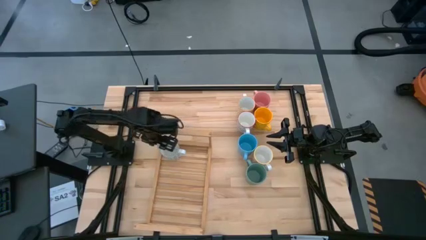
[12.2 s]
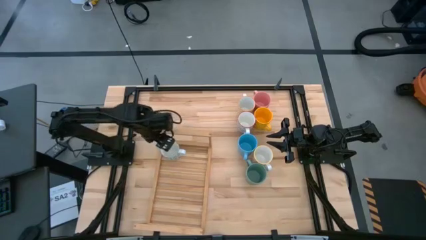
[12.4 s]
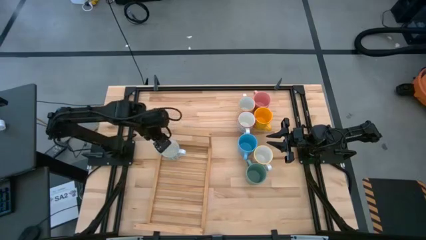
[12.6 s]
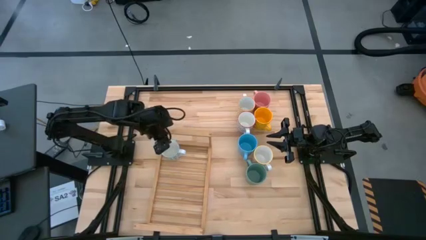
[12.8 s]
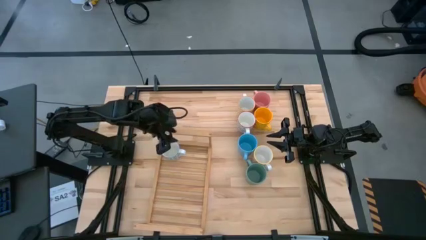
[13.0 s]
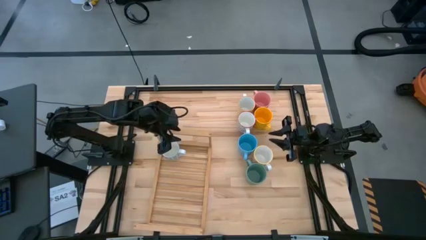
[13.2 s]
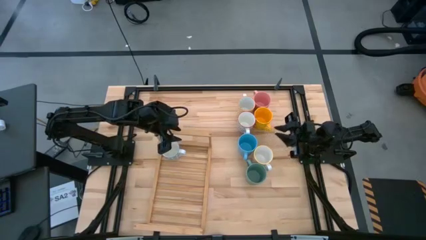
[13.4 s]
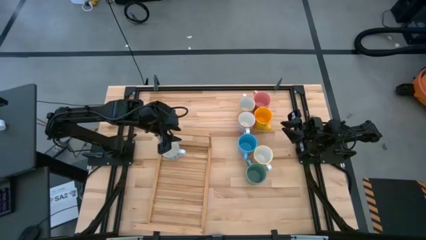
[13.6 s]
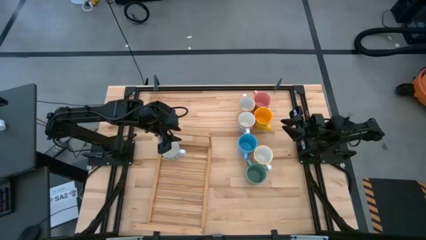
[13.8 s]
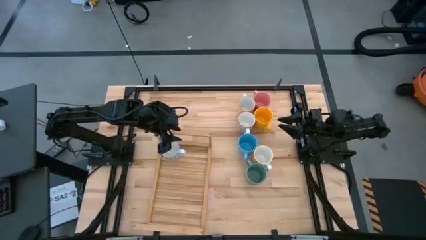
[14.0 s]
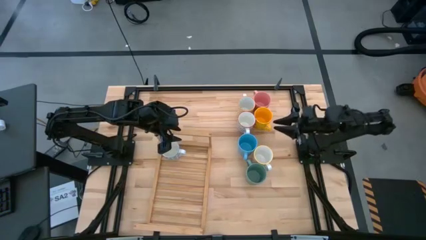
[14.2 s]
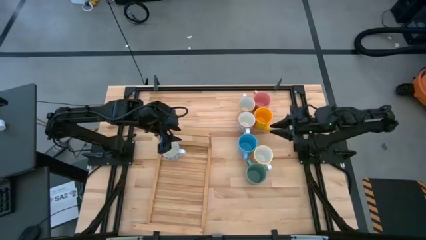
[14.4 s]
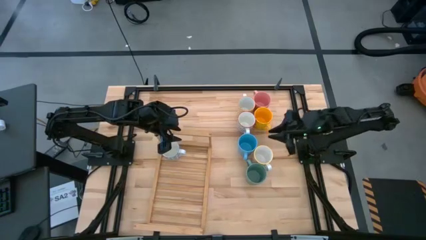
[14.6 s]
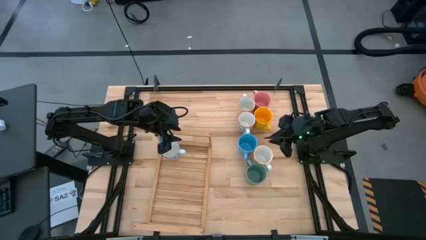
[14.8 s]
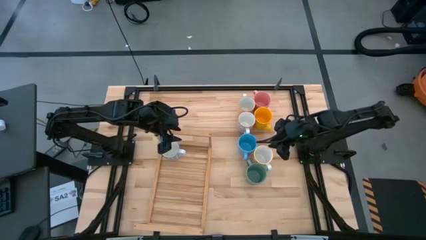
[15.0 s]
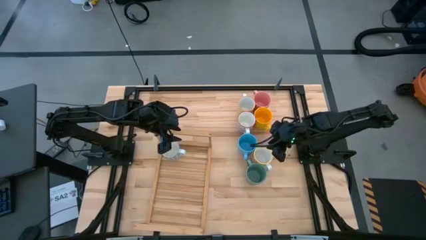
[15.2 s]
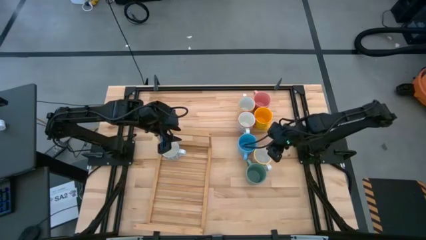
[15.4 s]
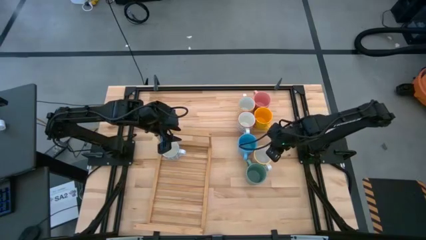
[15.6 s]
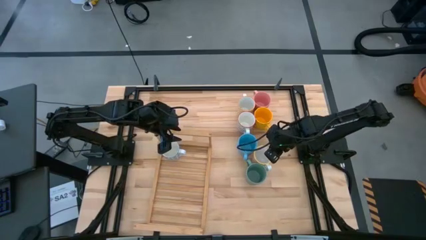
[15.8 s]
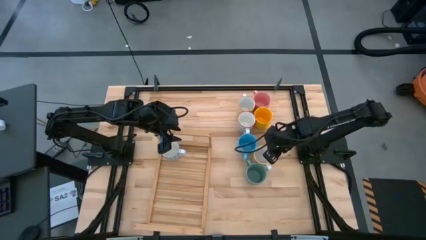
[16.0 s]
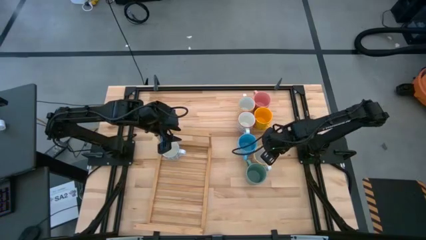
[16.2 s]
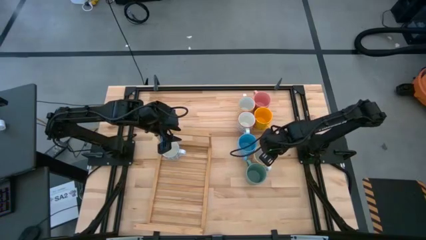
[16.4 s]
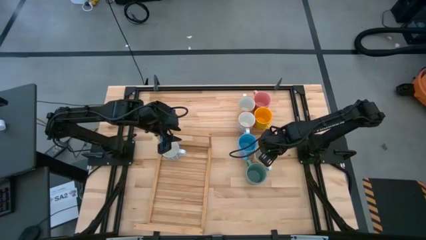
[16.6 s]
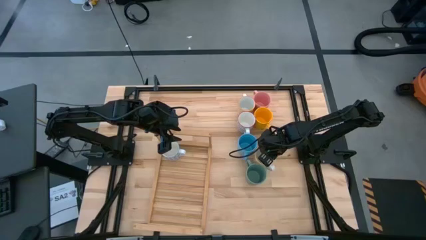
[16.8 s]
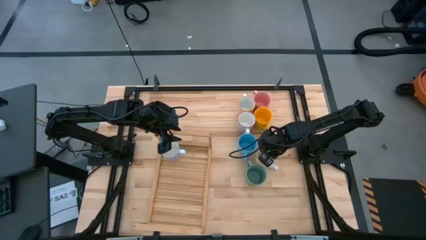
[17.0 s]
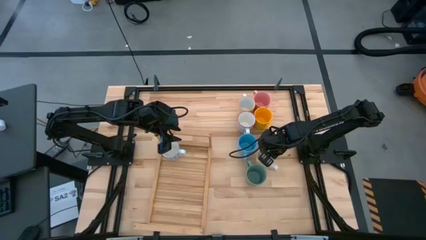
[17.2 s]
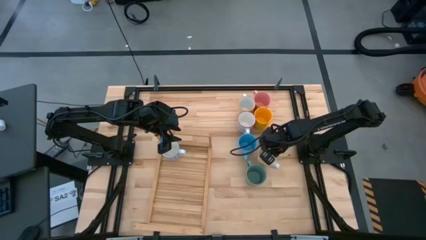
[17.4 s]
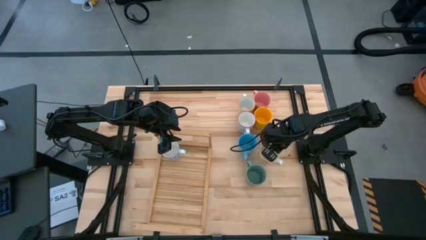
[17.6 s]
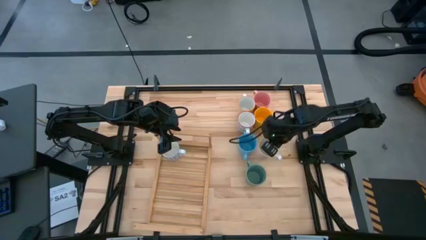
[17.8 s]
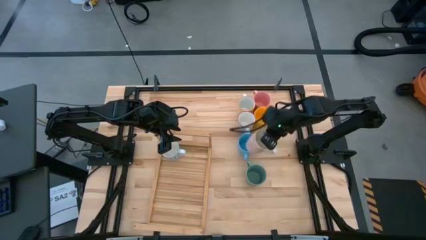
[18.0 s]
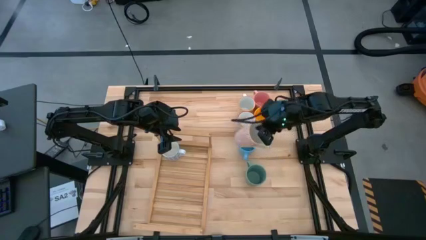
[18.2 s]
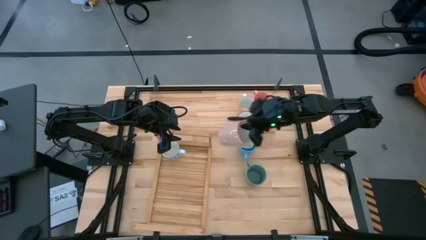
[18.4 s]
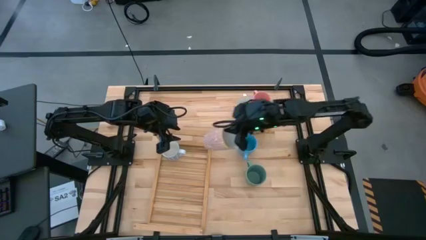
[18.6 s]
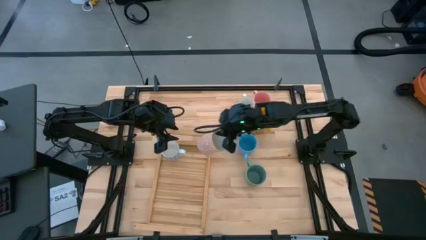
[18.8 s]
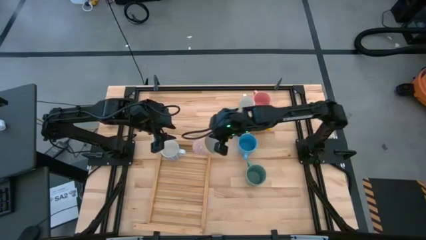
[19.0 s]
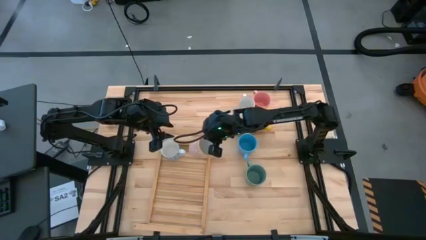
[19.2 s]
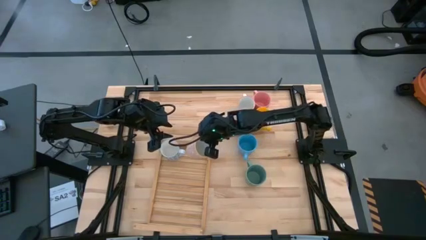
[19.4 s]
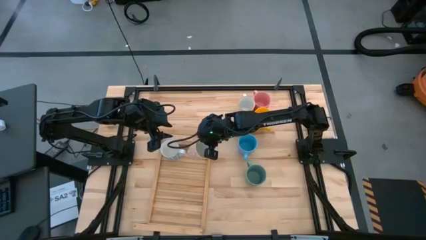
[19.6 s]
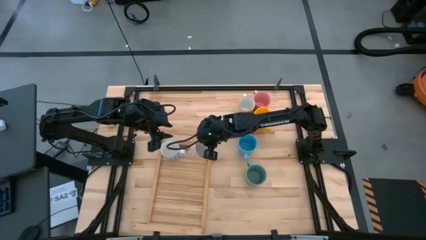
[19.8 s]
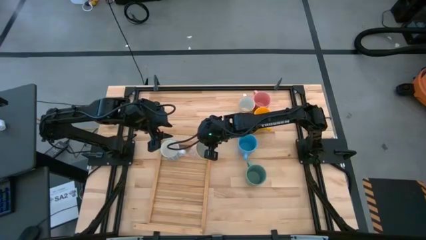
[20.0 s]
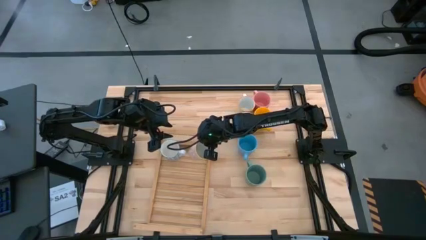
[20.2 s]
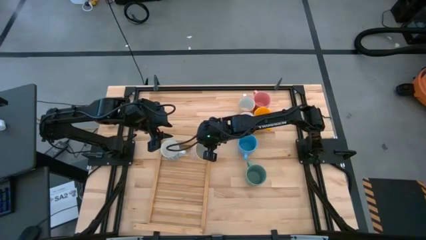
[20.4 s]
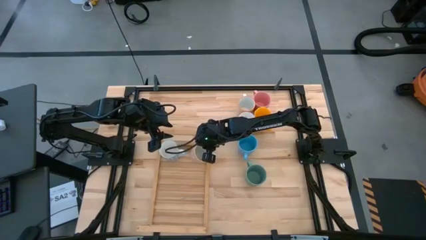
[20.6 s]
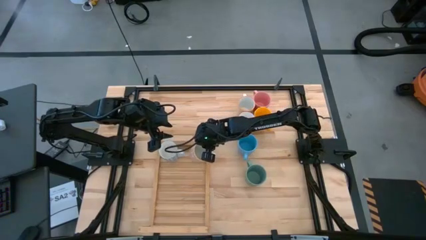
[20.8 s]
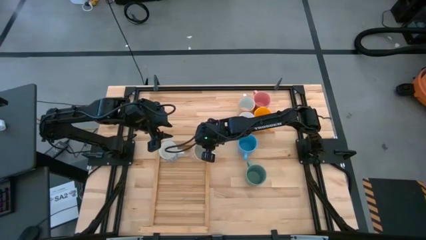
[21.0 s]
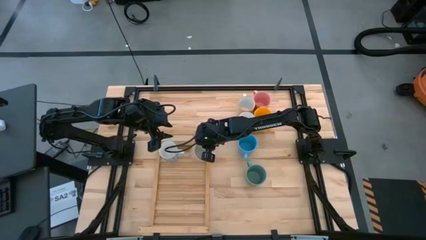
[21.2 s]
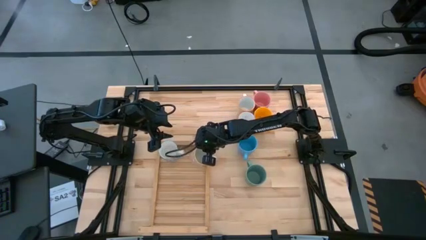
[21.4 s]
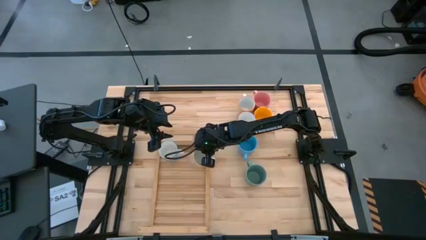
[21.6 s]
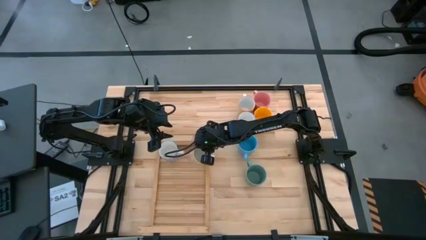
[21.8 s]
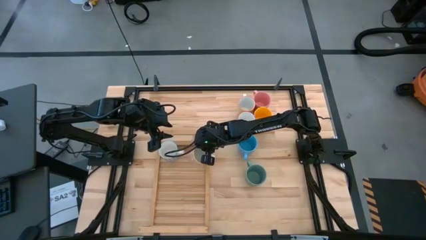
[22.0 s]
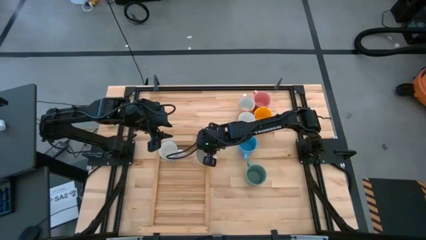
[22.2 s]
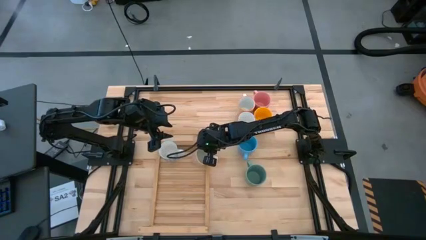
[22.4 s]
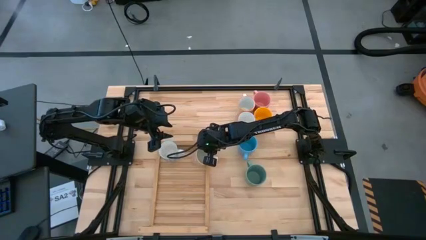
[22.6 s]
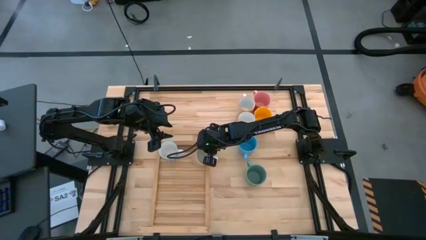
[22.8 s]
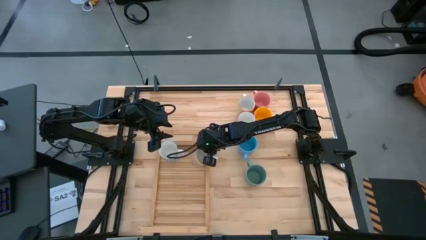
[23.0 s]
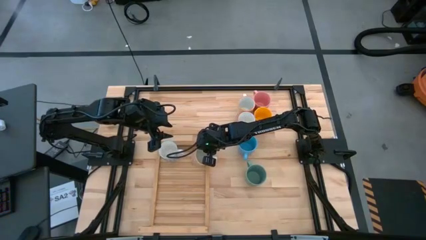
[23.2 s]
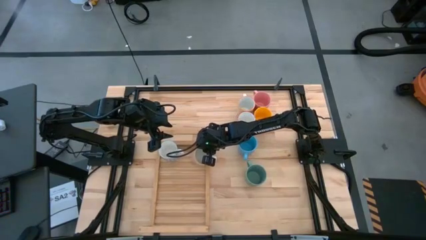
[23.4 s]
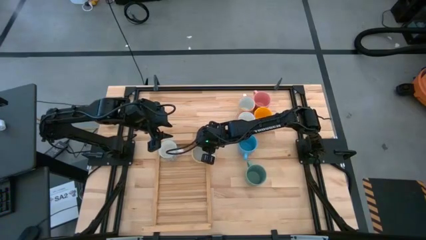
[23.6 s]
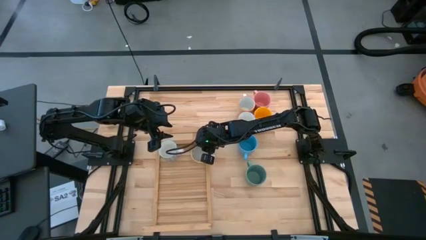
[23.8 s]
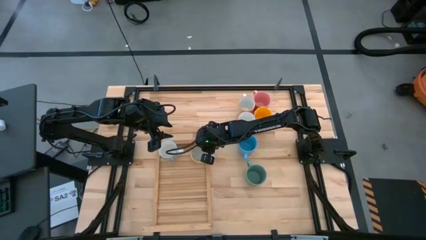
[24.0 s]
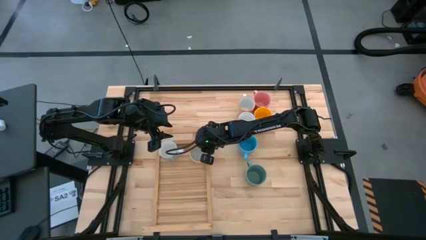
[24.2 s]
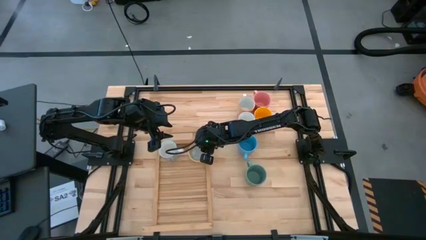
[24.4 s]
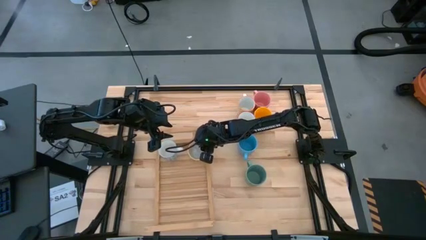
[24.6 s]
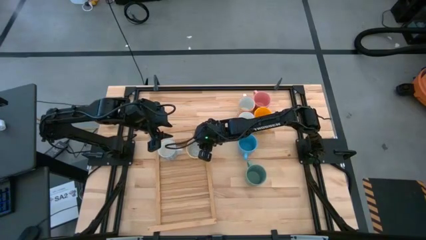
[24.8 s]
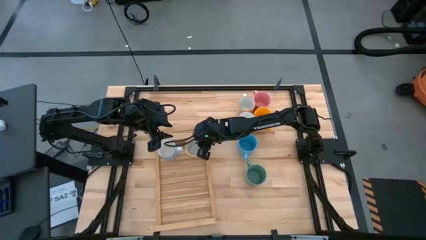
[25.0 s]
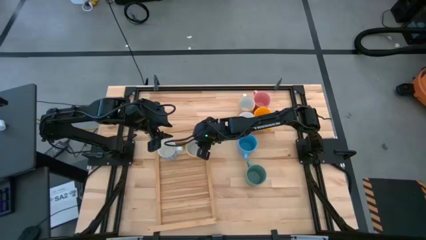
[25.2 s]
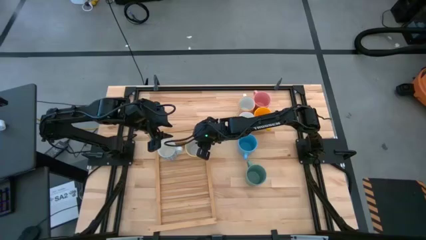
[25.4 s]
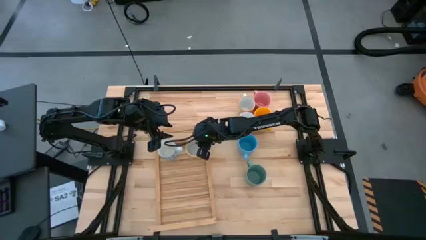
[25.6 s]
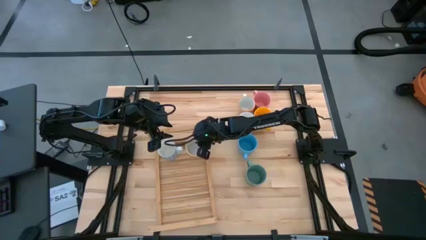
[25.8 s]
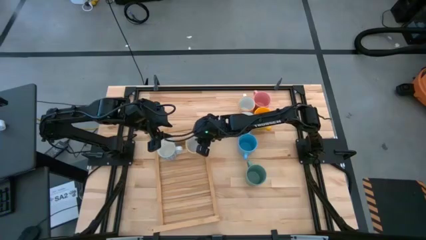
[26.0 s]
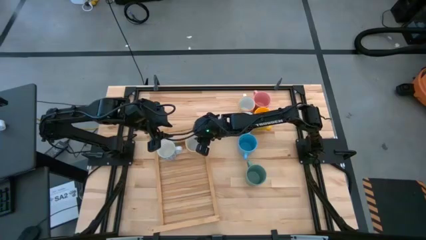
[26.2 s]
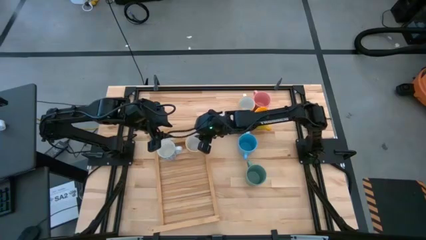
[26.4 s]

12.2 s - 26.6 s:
Task: Place coffee mugs
Put the orange and white mug on the shelf aligned with the blue and white mug

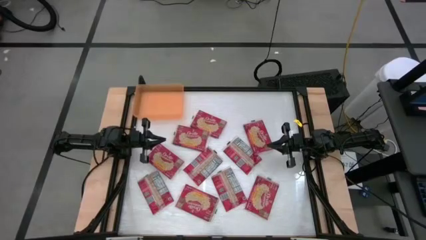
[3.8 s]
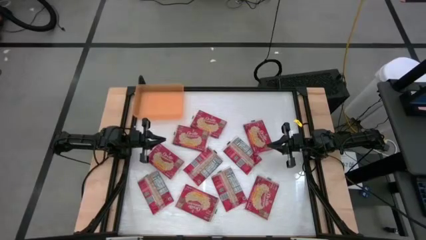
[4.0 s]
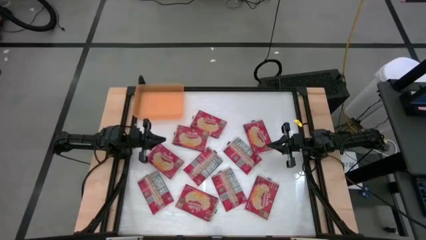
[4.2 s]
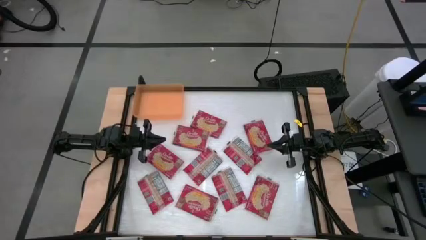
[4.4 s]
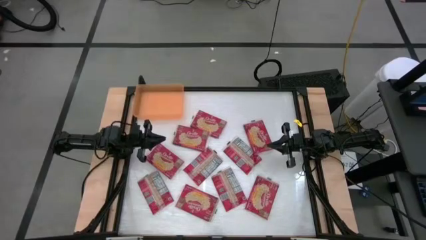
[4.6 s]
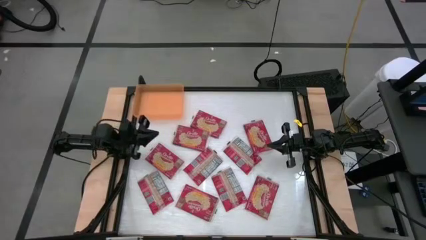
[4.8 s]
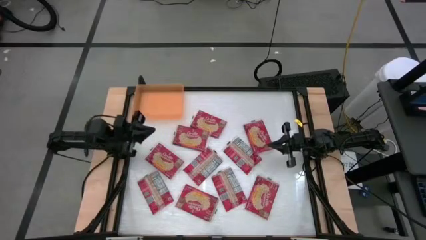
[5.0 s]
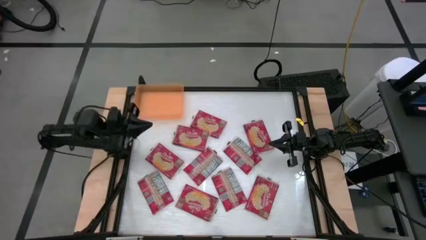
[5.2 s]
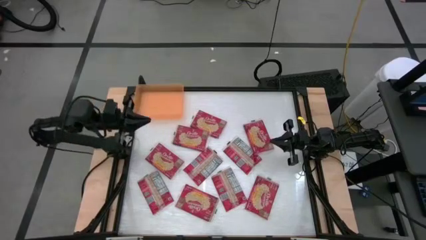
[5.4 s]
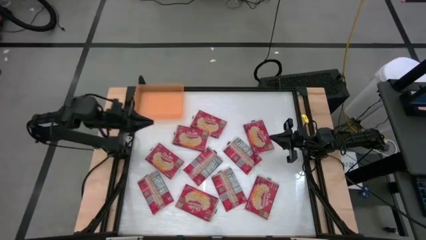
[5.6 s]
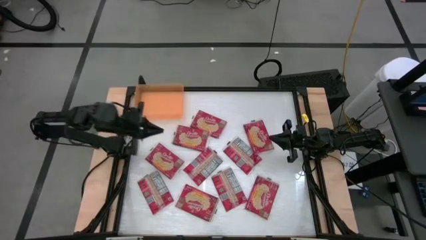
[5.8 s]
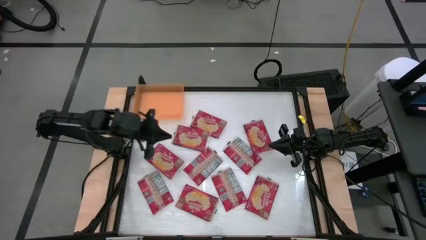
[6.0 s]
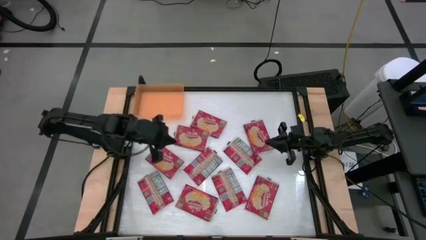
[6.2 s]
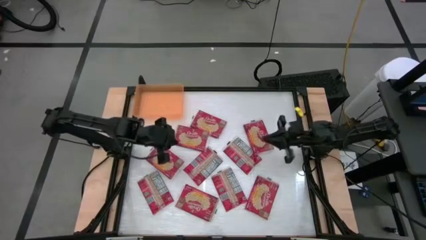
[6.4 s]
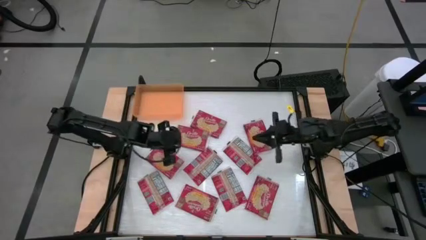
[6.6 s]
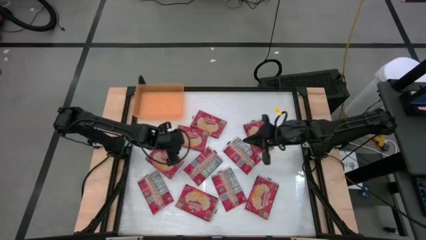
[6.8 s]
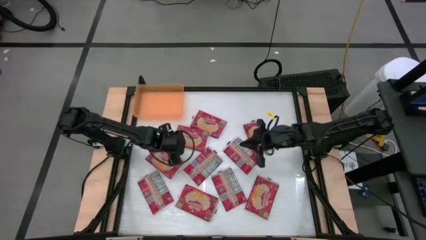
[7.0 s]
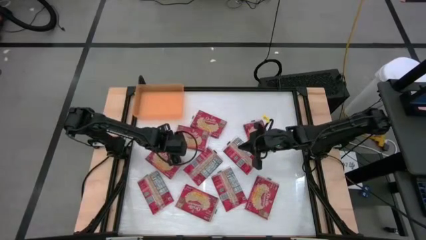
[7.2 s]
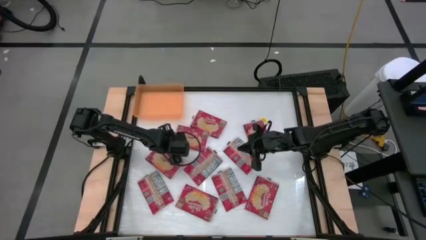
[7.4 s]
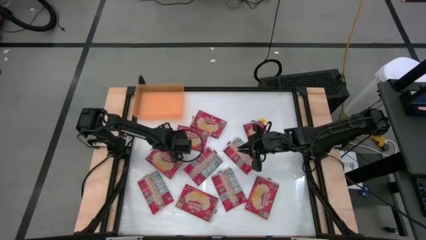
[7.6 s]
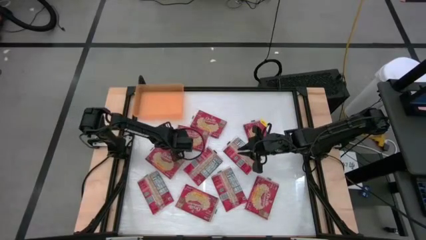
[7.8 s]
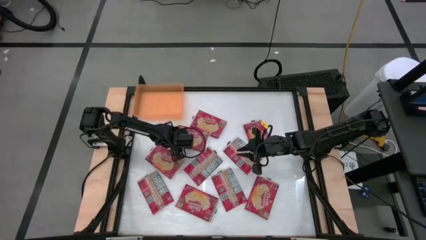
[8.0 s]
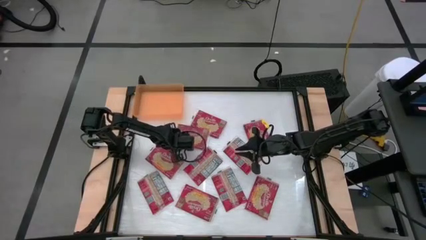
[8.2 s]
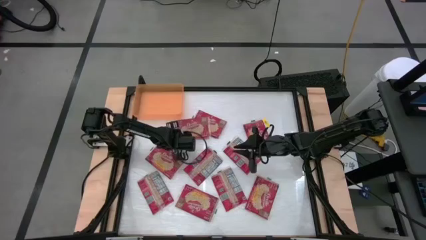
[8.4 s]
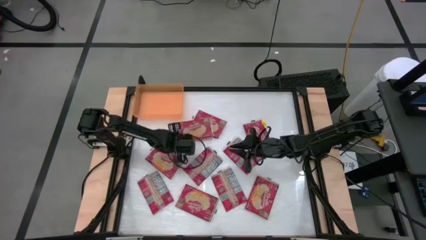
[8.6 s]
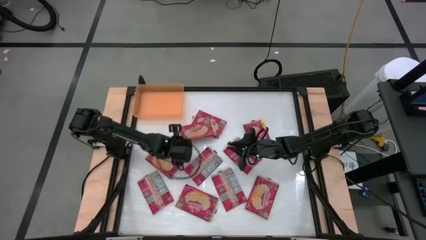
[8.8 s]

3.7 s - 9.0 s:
Task: Sort popcorn bags into baskets
Put the red popcorn bag into the orange bin
